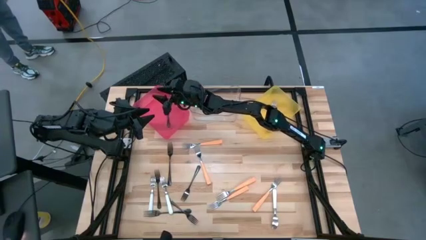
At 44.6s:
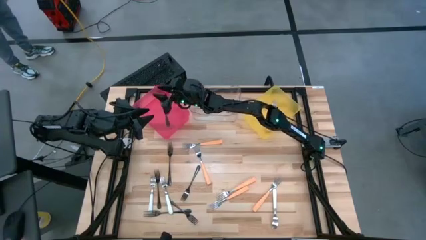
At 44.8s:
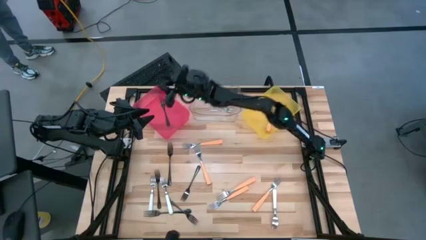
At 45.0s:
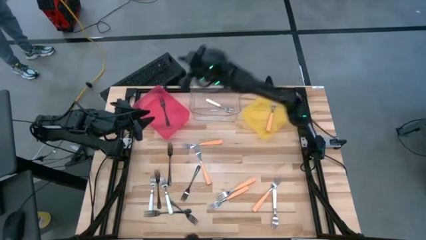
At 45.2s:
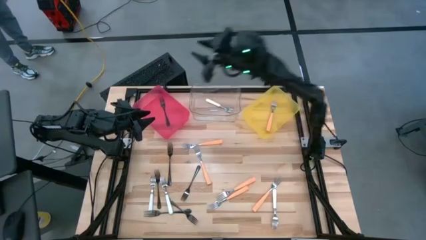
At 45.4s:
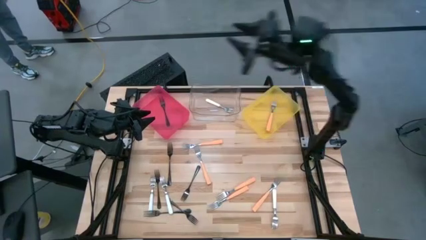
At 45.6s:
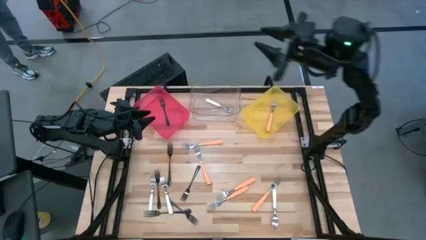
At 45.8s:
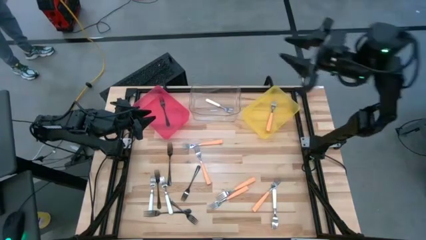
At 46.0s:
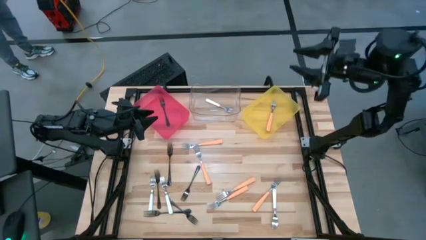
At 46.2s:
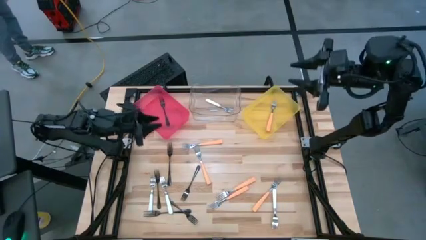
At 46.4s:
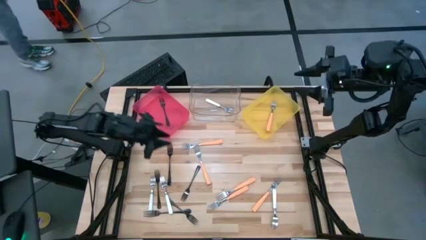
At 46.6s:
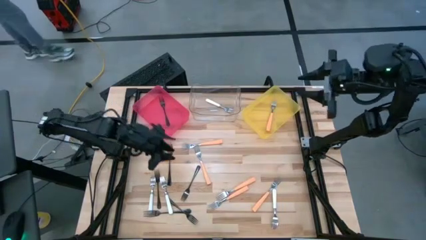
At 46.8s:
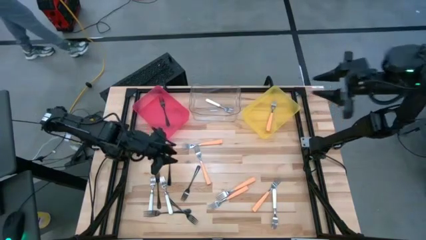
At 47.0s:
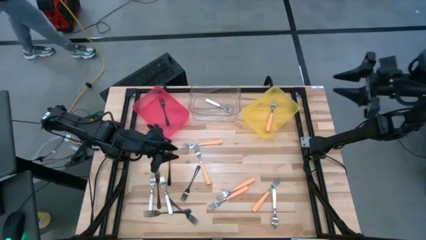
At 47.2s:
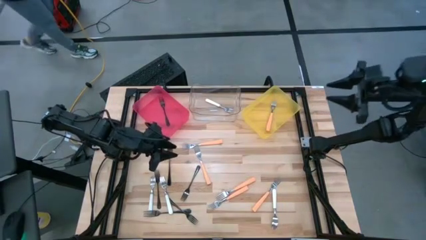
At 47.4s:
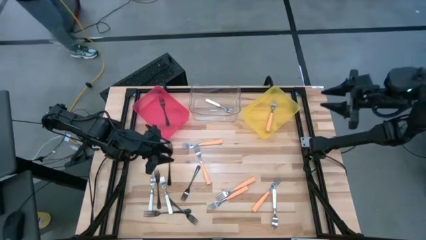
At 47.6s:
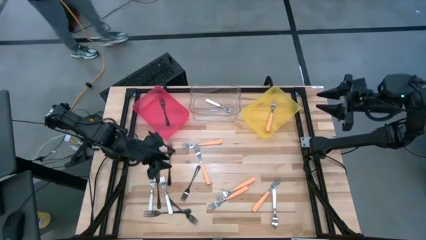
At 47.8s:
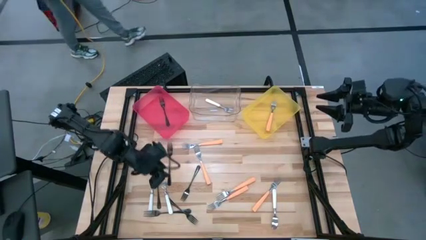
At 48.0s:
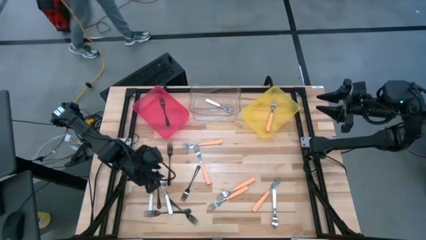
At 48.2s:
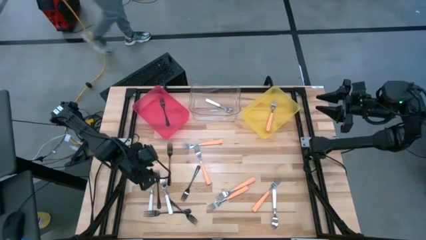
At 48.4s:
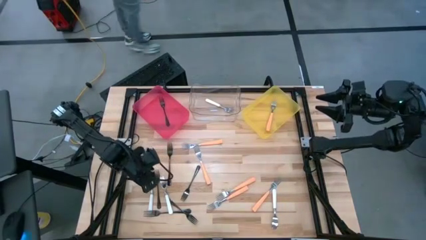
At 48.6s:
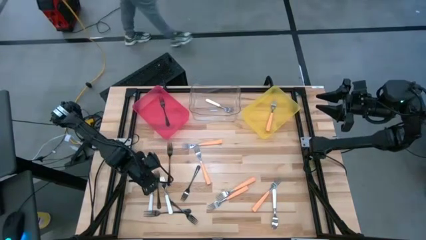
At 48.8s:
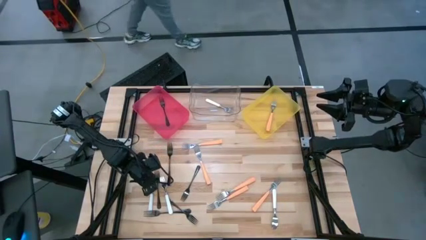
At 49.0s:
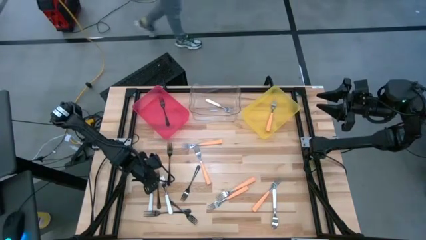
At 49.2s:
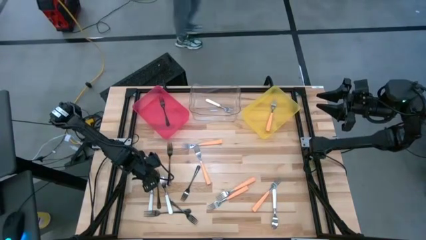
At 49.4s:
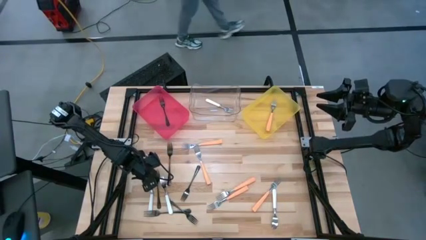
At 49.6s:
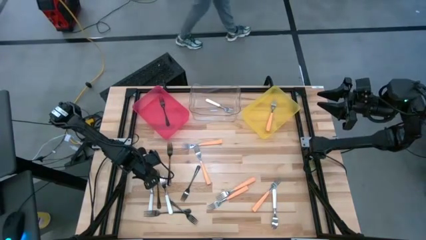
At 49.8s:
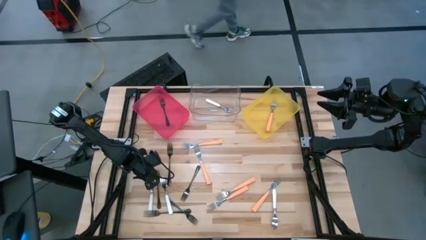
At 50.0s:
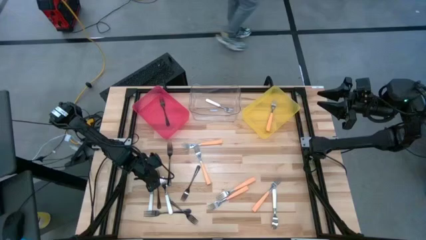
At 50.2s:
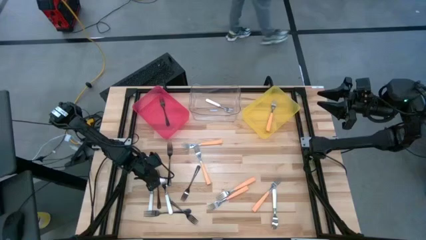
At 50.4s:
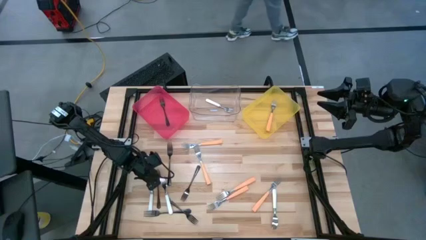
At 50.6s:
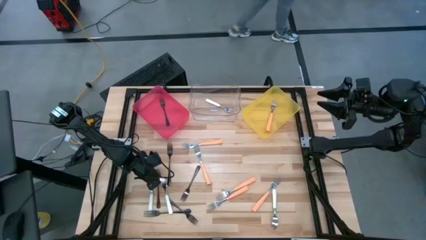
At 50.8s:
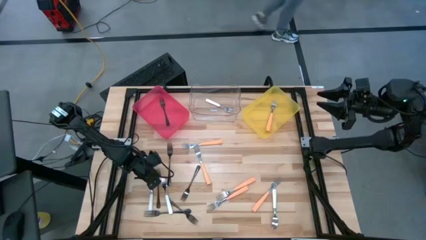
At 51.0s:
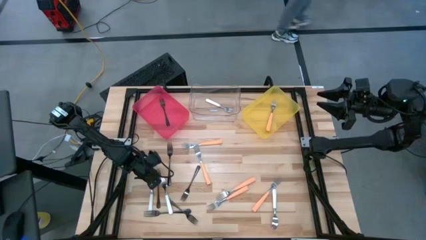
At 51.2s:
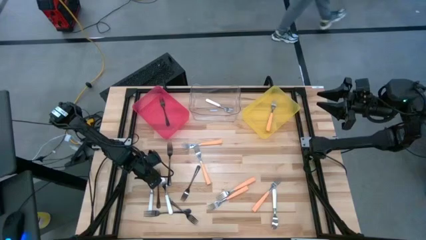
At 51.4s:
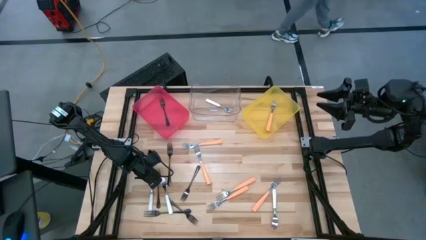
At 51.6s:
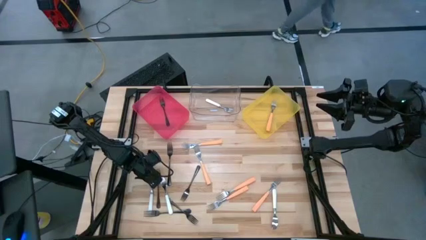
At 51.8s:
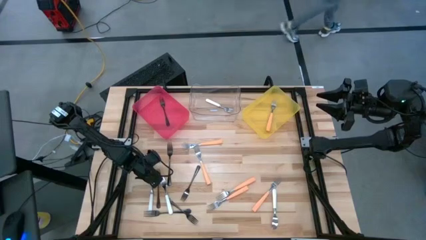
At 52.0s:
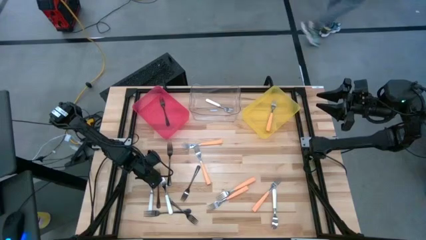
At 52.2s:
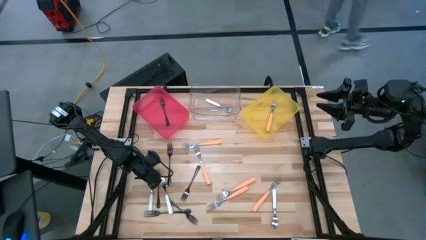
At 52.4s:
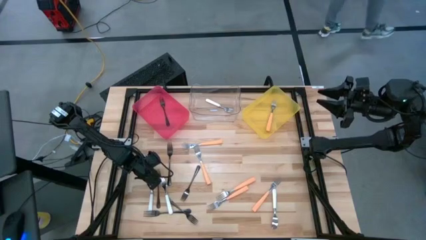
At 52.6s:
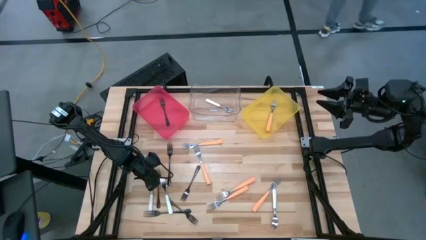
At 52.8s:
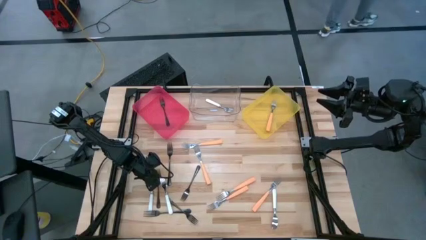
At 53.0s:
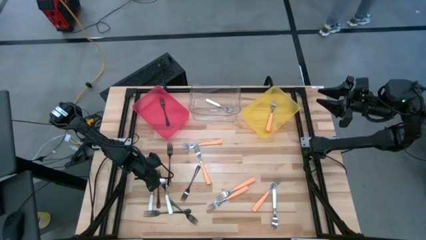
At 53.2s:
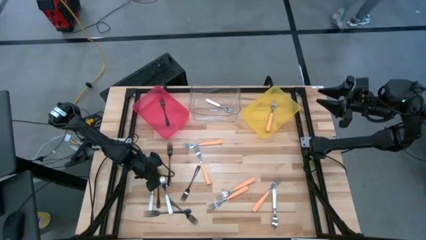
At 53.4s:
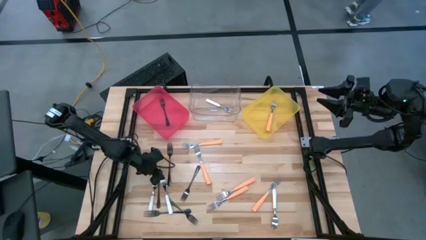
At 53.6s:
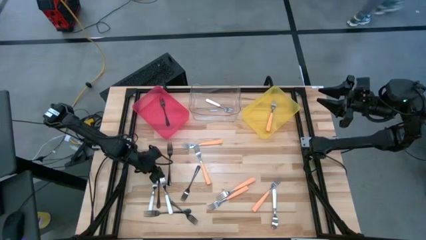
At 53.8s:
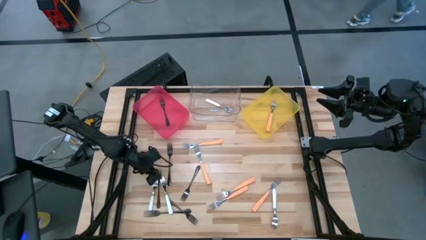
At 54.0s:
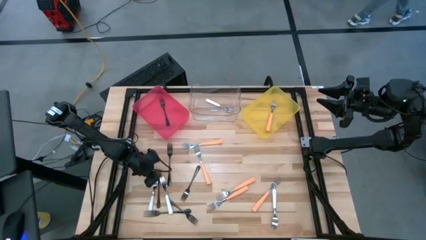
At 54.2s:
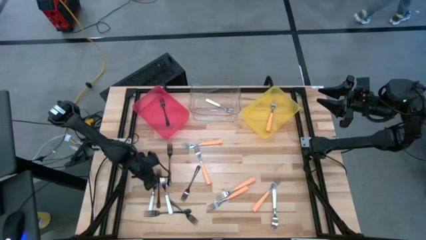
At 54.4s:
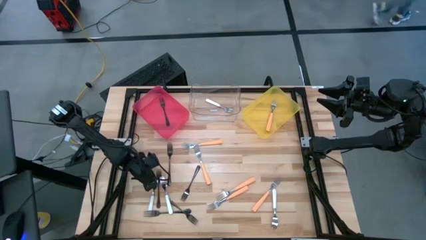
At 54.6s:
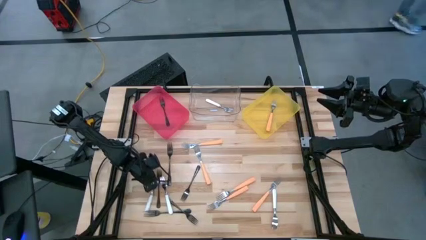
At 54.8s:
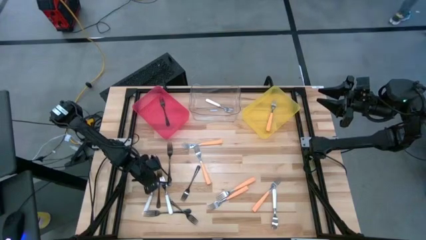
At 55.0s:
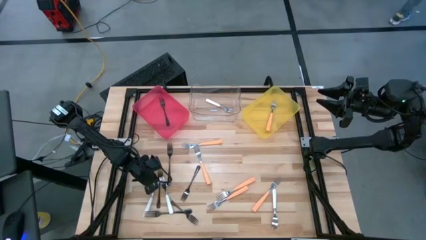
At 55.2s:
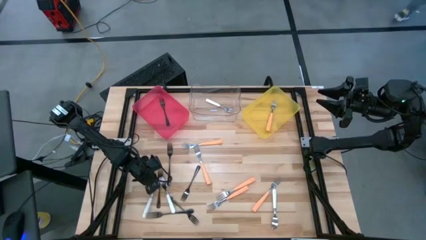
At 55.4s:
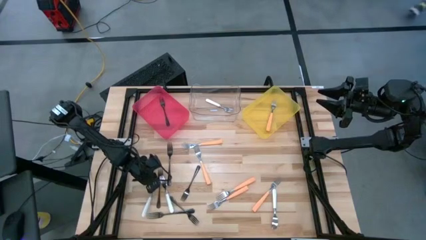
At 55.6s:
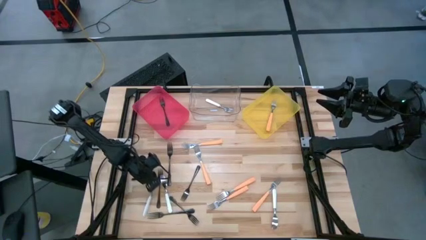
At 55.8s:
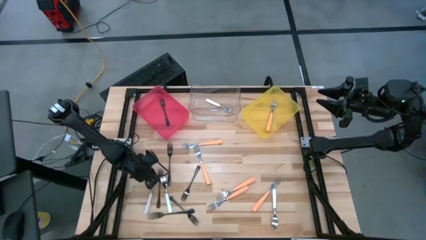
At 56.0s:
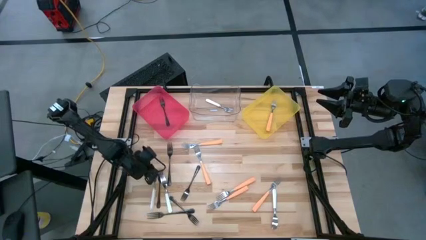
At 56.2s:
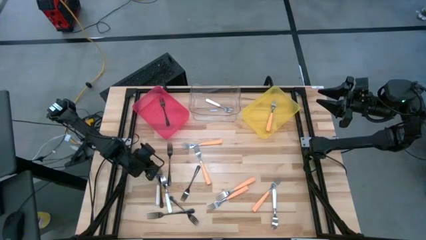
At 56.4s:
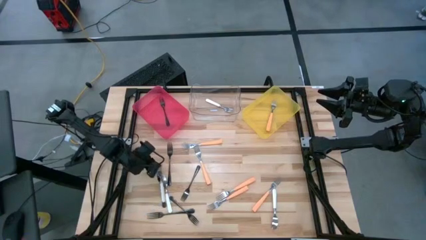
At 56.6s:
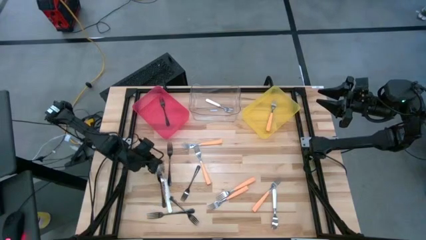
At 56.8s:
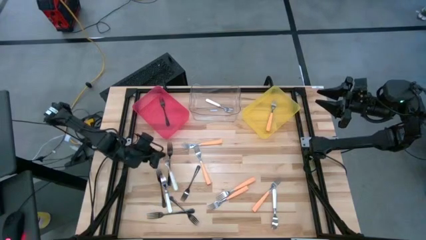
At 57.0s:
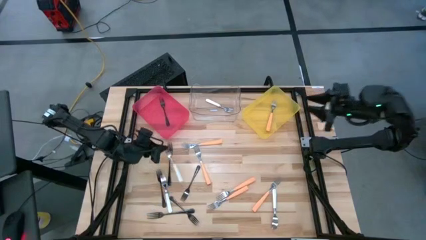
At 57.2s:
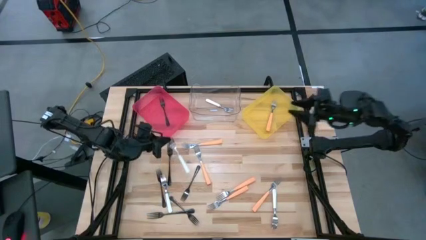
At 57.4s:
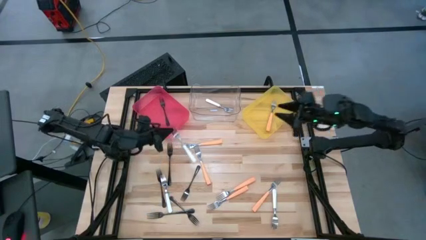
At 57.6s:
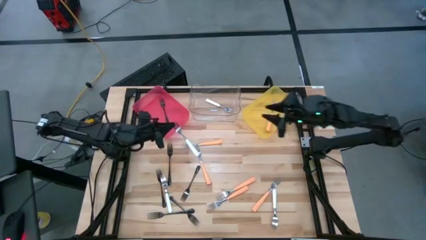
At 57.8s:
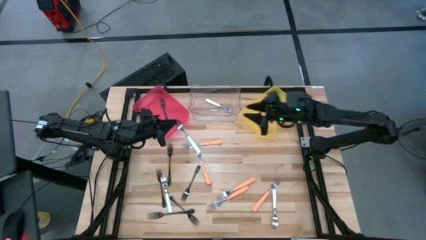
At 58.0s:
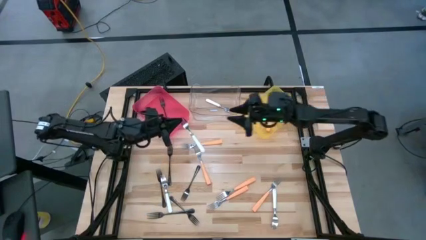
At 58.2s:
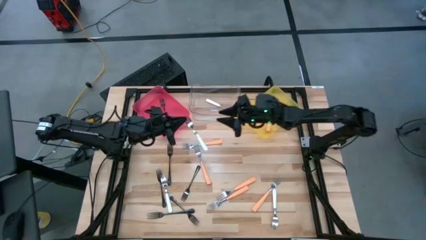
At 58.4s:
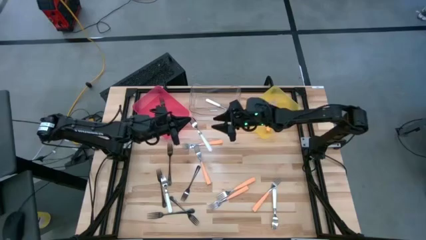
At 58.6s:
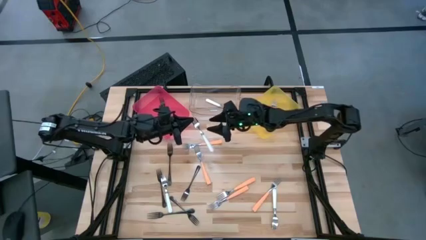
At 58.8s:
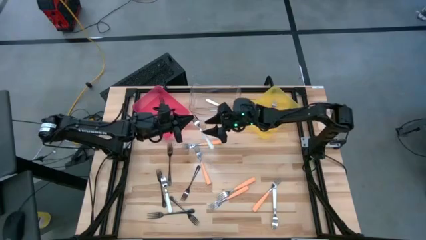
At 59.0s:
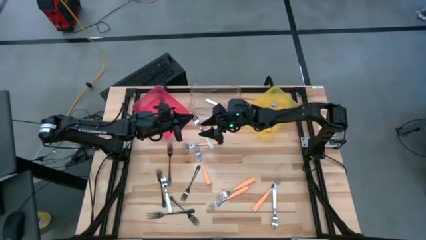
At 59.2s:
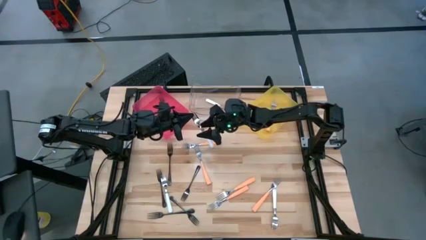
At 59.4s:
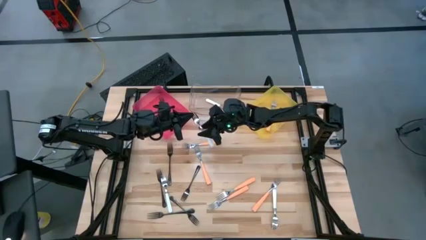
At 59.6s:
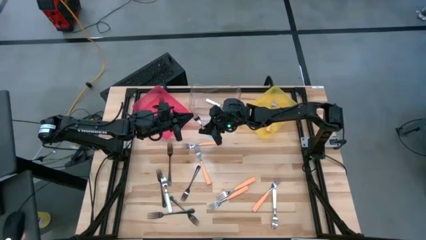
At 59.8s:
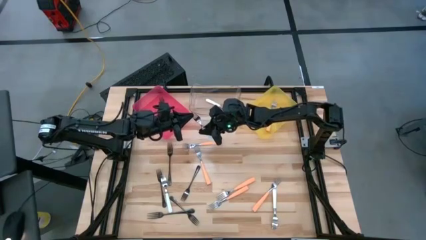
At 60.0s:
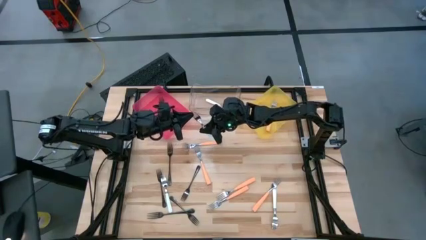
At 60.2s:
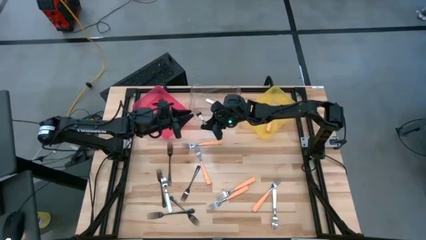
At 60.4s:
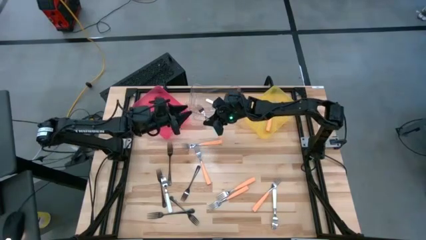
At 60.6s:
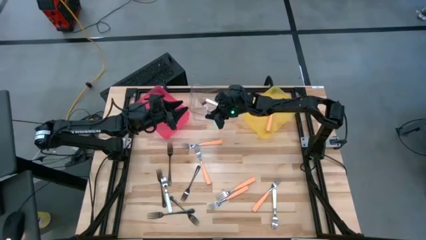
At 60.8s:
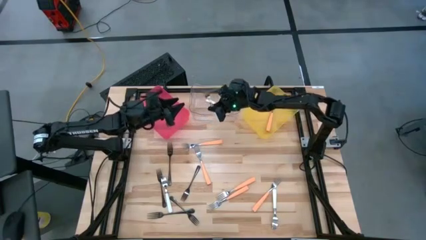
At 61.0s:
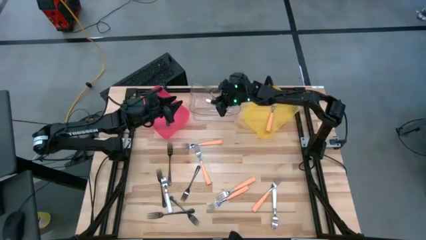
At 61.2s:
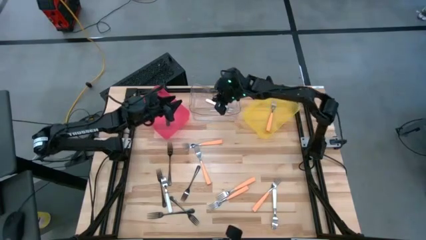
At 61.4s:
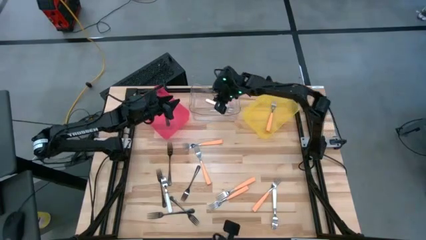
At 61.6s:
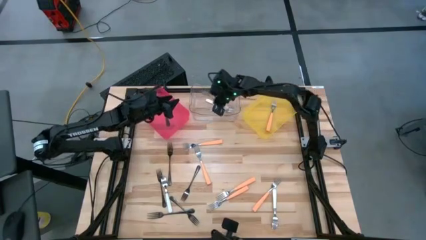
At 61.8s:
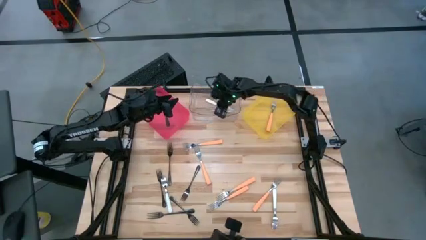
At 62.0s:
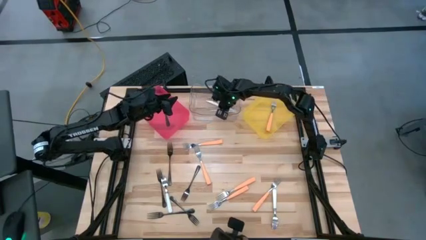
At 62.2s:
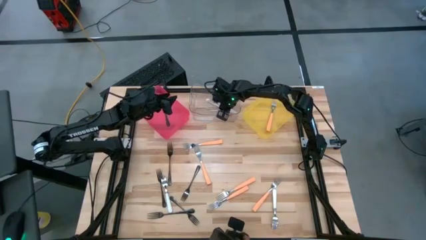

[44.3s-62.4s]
Task: Sort silverware by color (type)
Put the white fork into the transparent bin
